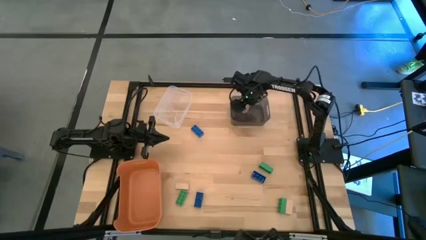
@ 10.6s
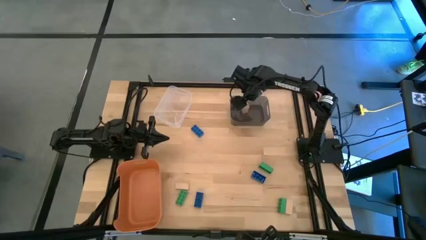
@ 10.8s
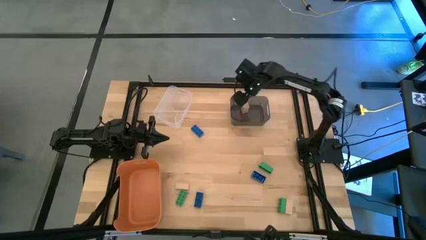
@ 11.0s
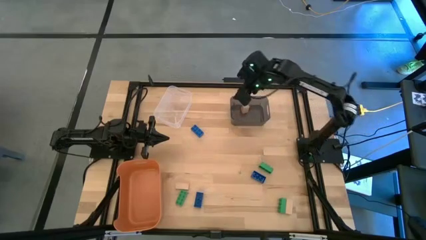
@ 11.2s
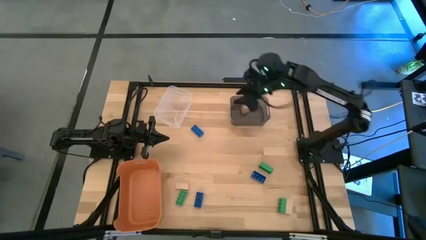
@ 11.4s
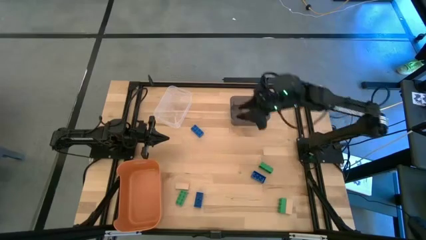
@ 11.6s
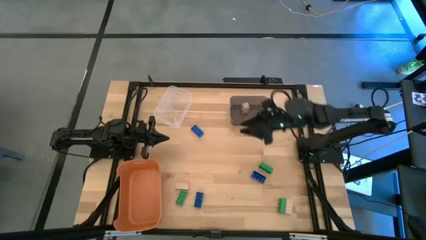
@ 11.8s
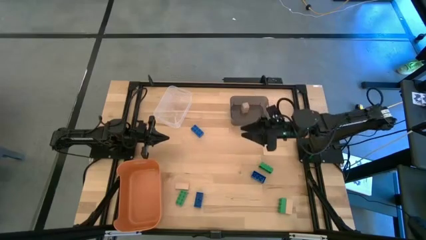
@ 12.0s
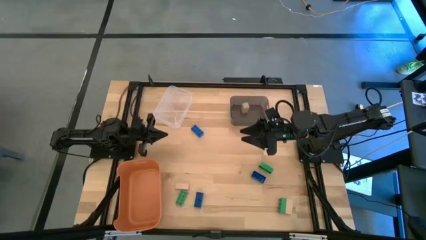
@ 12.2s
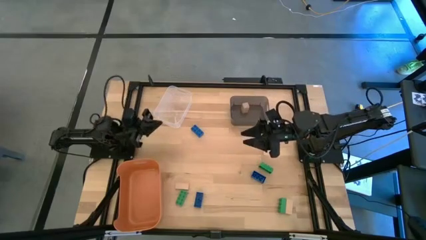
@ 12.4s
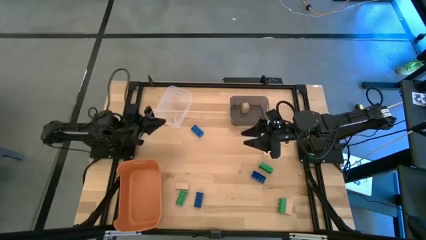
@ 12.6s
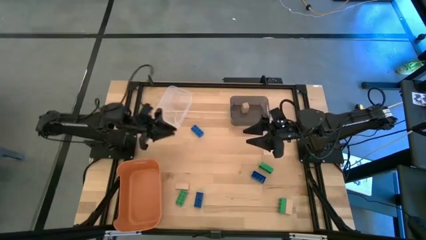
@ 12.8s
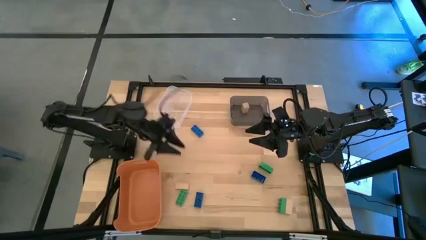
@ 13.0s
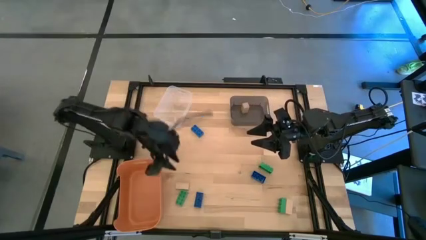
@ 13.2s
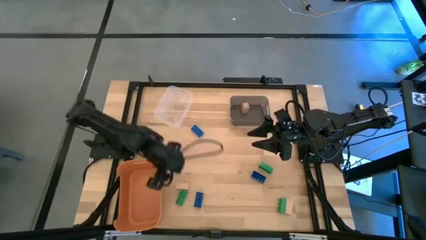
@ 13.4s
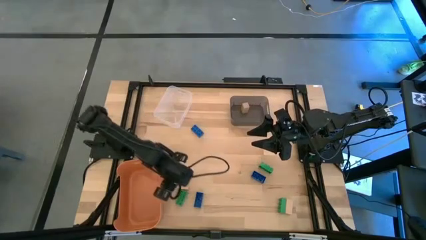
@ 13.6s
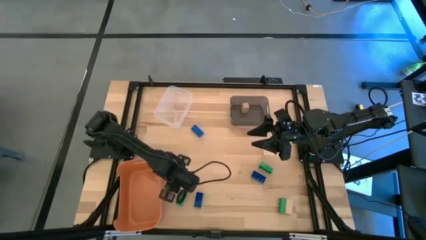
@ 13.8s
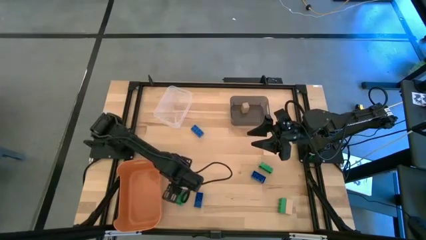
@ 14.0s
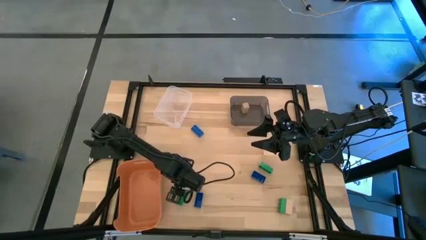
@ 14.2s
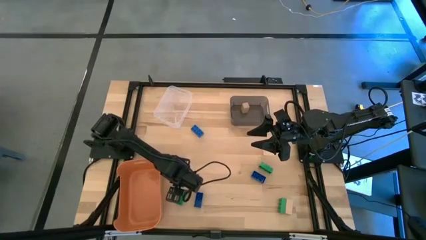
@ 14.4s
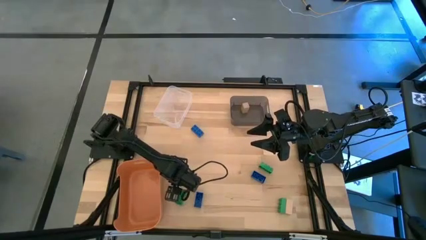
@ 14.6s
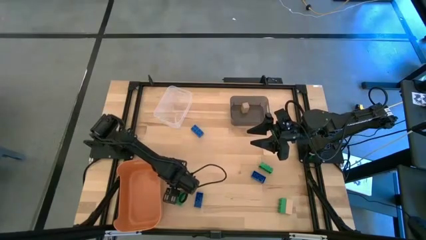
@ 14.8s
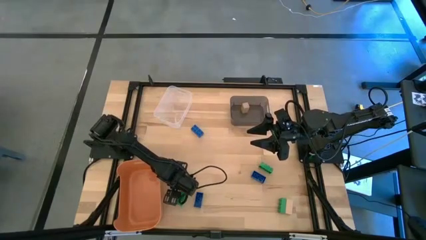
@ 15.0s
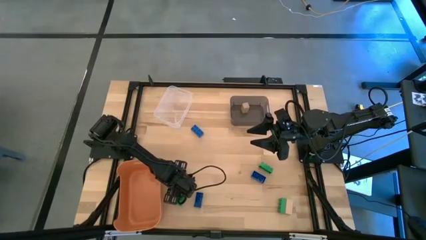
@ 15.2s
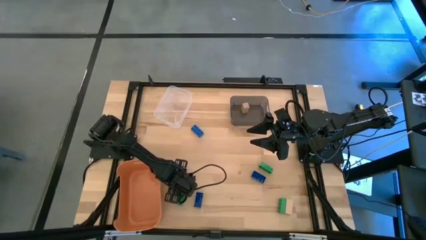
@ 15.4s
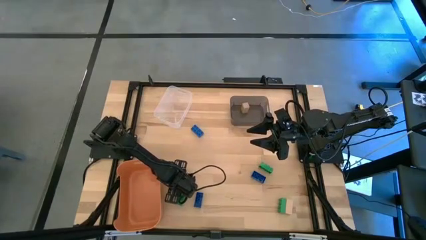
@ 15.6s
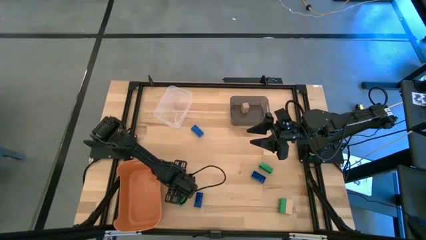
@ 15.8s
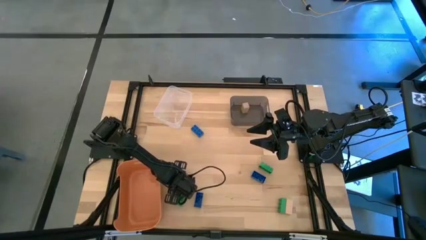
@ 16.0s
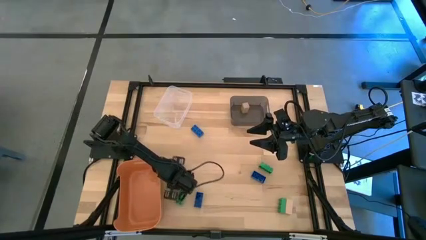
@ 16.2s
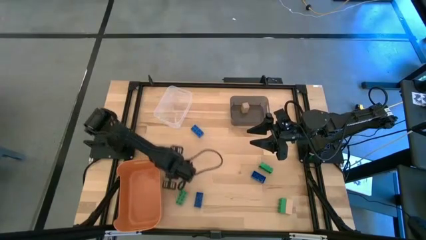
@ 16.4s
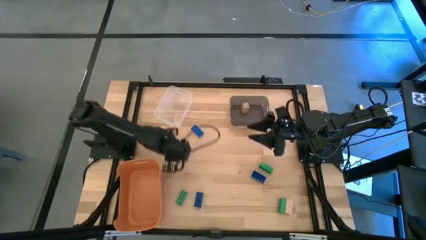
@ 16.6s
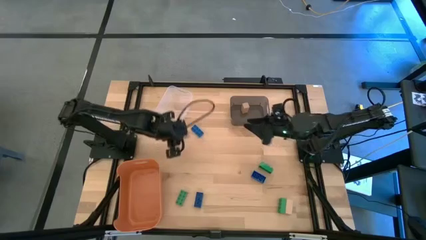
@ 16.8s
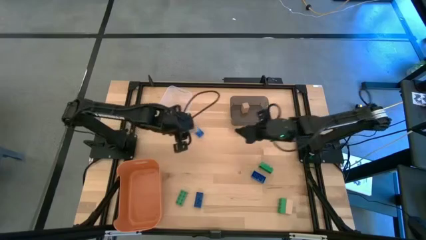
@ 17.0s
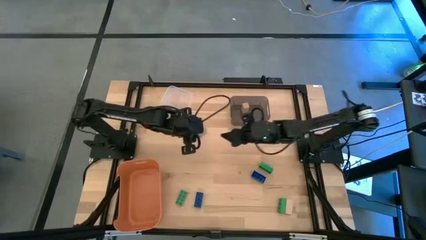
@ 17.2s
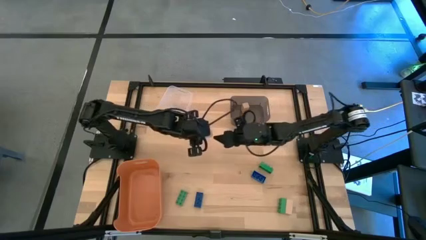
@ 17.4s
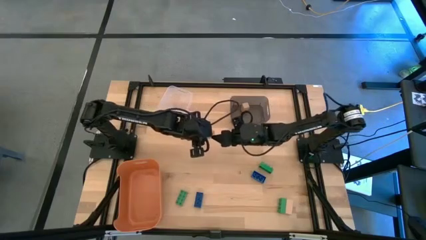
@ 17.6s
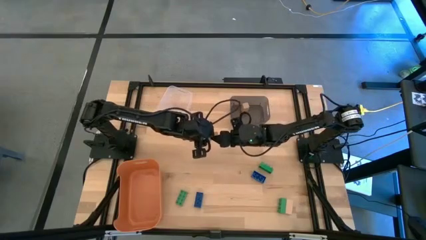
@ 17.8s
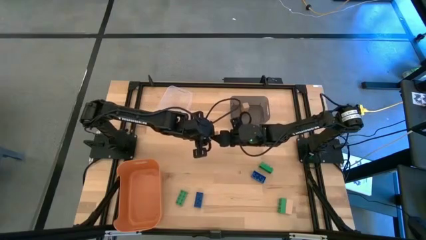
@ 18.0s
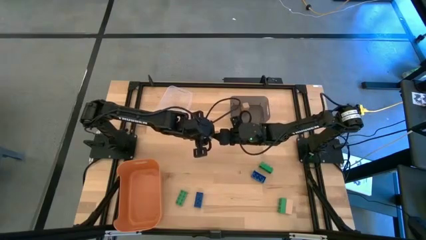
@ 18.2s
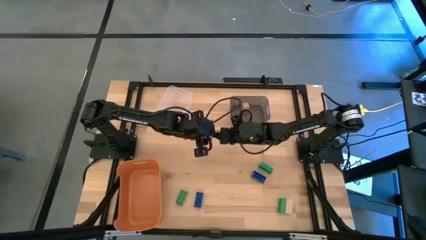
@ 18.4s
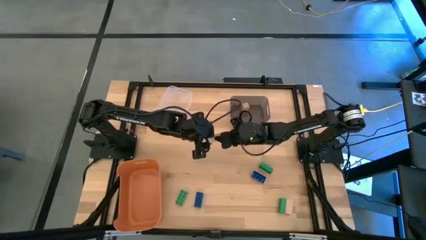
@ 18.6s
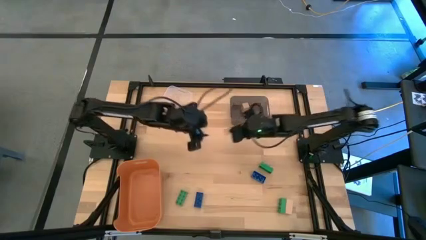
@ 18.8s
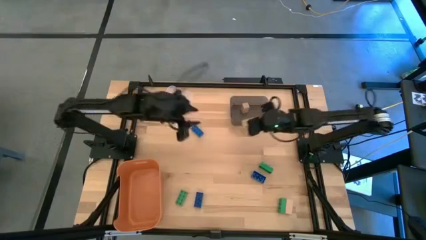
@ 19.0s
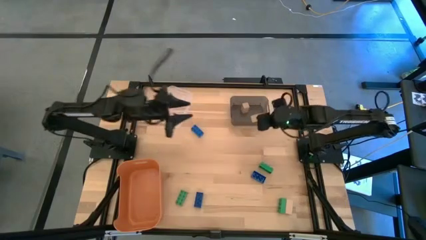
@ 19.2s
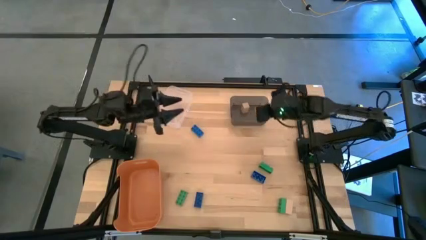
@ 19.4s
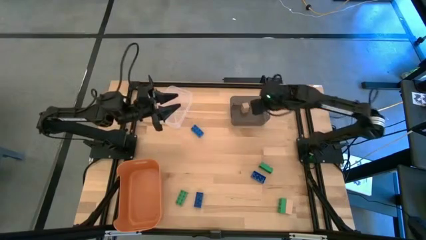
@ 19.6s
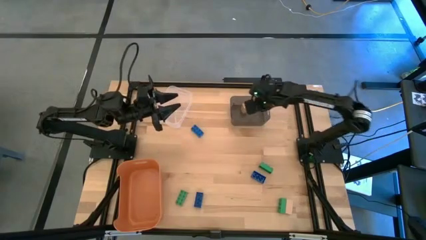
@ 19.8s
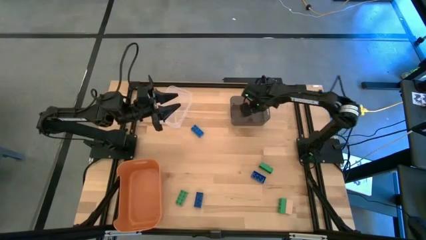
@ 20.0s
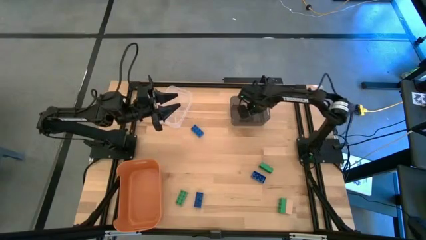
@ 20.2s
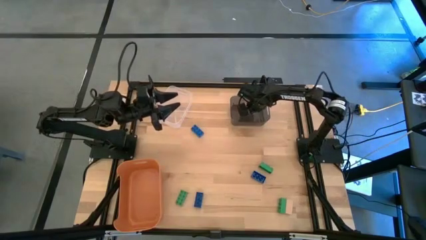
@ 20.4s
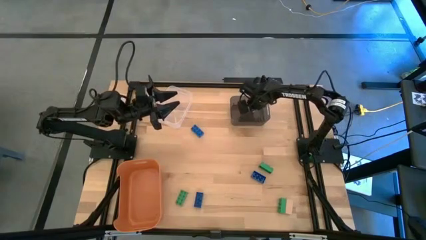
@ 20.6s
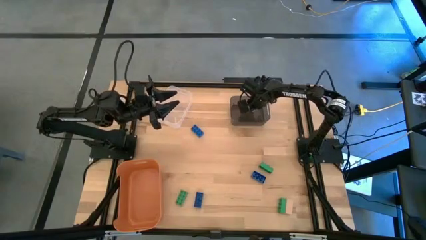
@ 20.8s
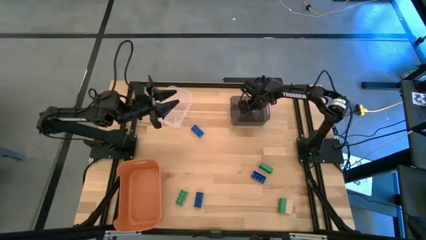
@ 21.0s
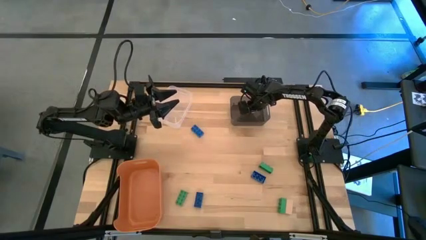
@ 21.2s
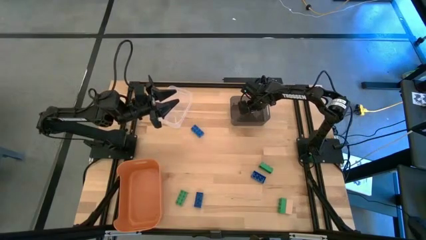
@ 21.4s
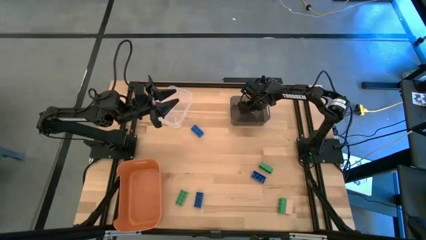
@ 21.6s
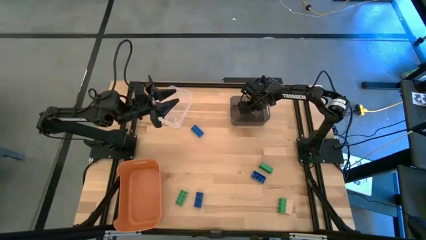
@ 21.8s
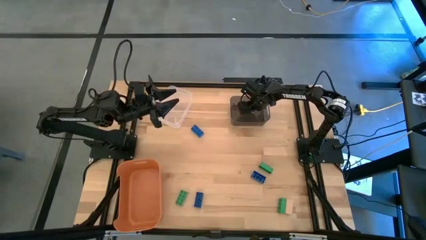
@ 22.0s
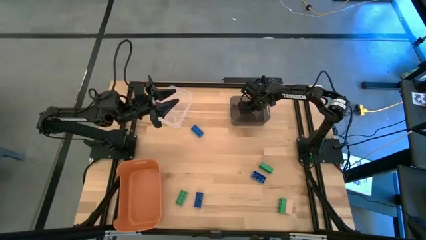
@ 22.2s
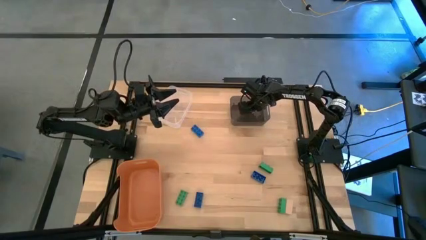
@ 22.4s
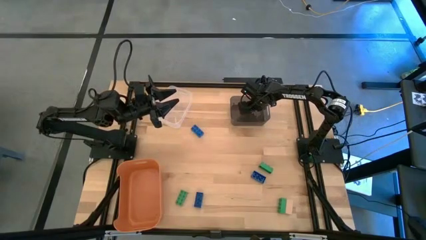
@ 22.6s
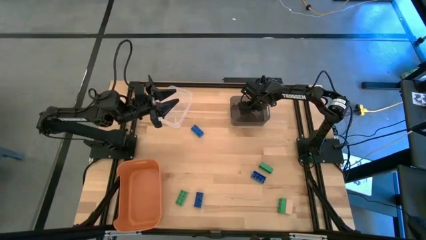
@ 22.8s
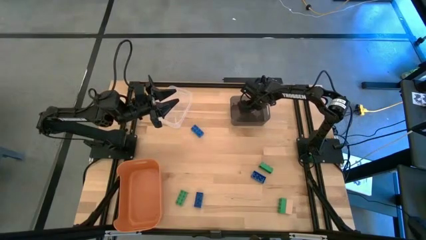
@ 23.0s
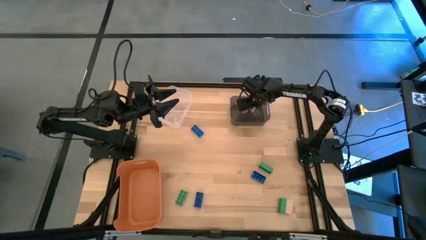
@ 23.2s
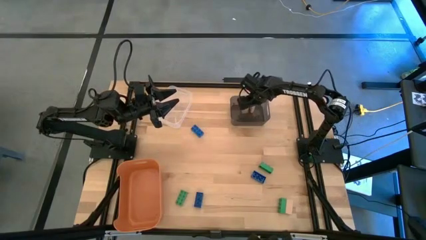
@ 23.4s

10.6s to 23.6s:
Task: Sort & place blocks by color
Put the left brown block into the black bin

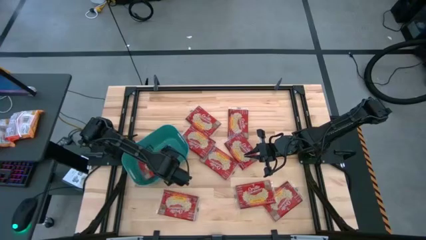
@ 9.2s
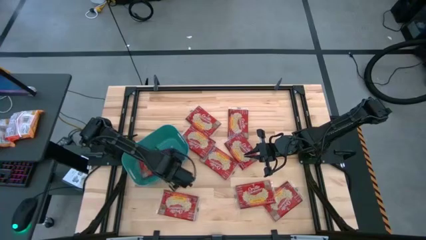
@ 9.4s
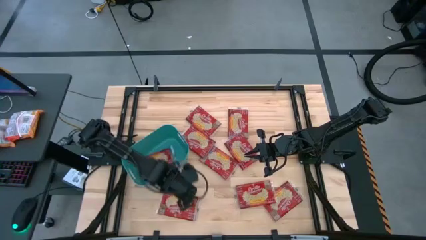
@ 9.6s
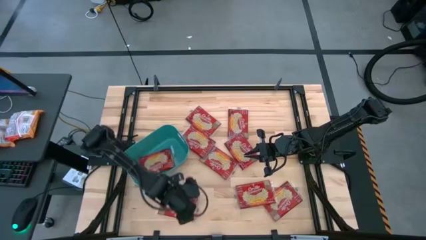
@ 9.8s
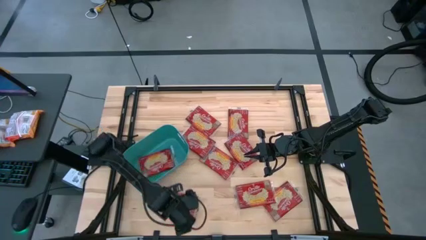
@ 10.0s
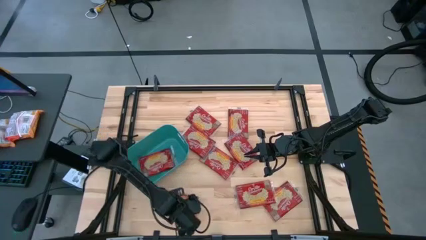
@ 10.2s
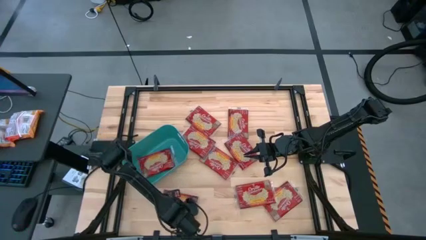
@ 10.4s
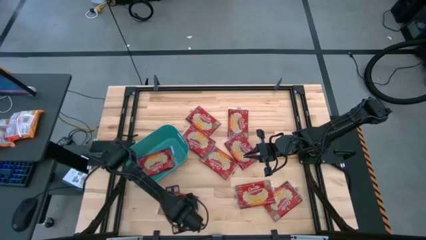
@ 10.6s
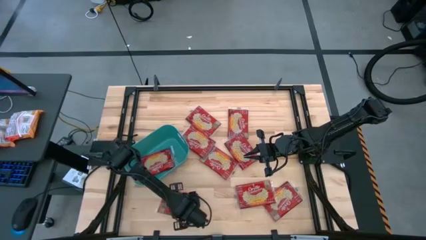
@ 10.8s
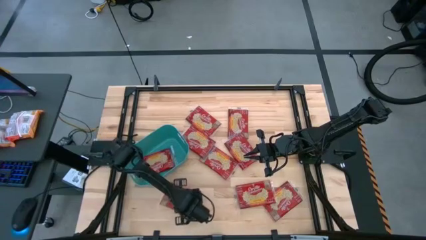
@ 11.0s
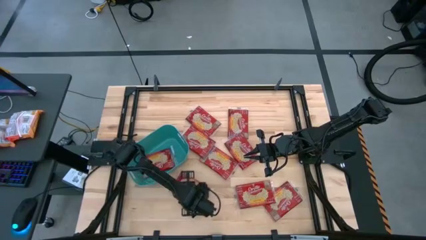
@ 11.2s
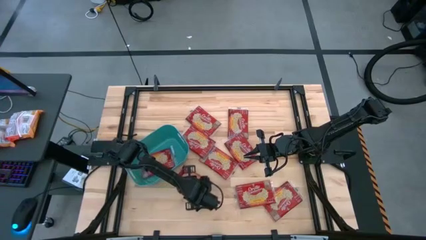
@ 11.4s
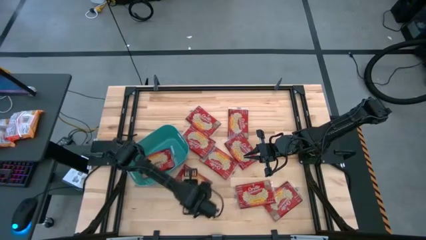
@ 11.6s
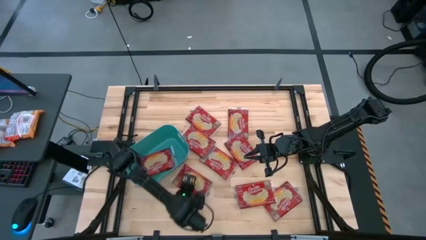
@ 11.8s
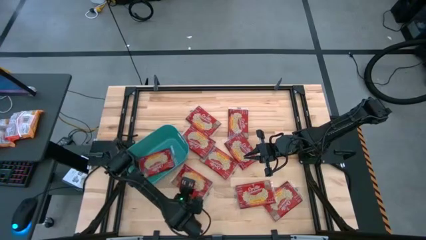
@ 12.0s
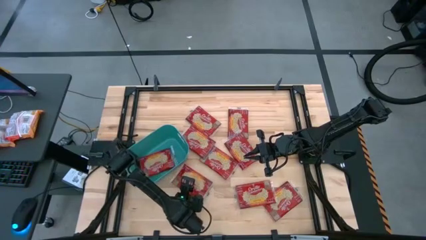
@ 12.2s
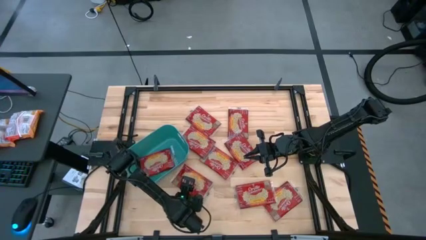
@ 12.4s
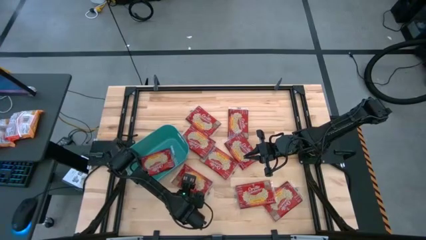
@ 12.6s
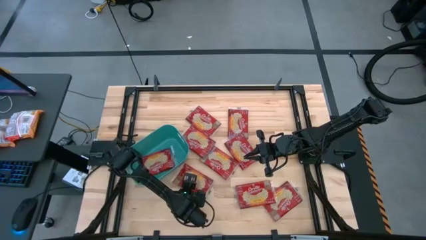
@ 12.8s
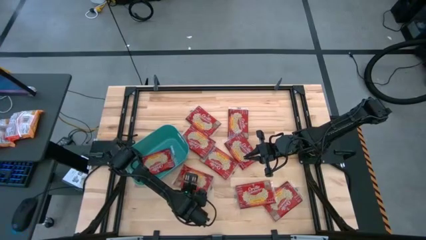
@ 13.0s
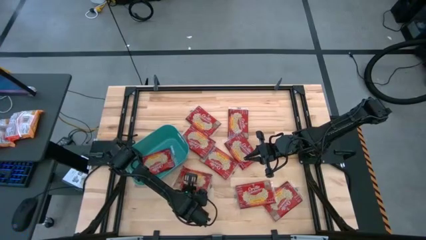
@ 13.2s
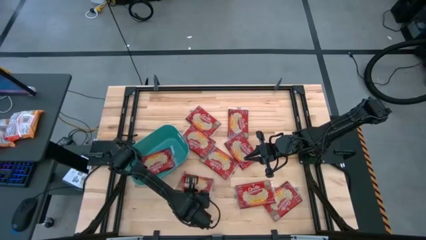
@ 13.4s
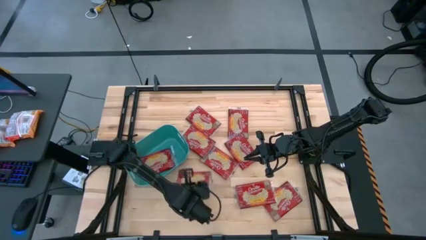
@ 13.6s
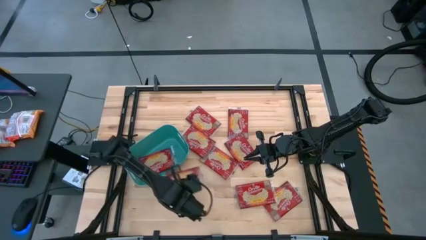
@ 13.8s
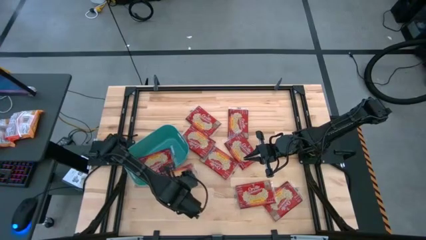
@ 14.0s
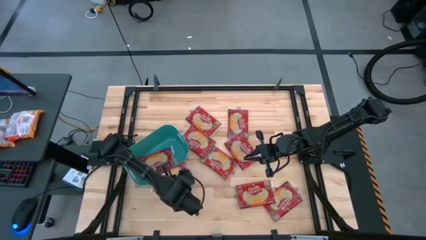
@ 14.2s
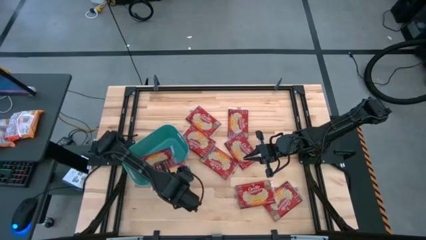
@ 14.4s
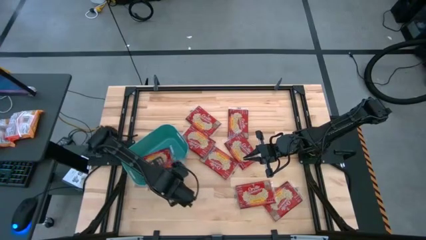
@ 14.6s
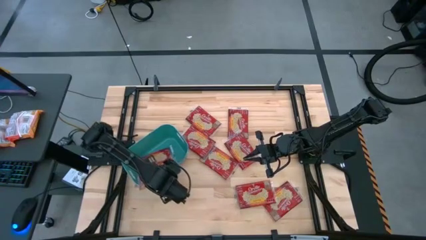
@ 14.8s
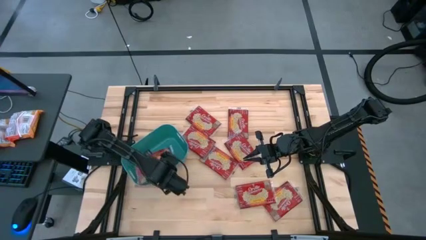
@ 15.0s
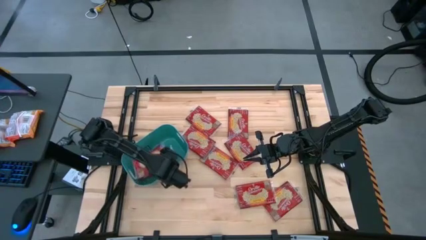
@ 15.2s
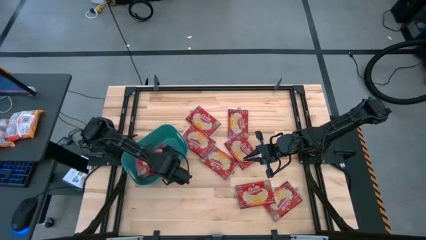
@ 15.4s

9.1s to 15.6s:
Task: Sort popcorn bags into baskets
Put the red popcorn bag into the green bin
